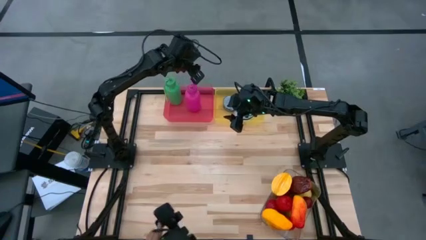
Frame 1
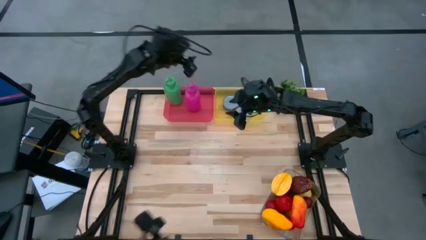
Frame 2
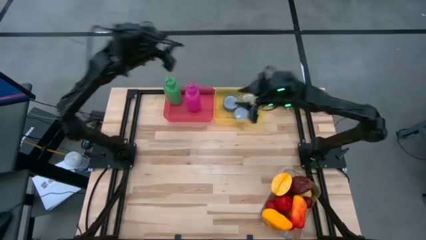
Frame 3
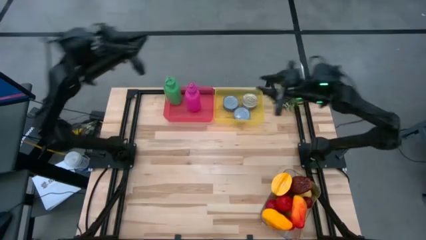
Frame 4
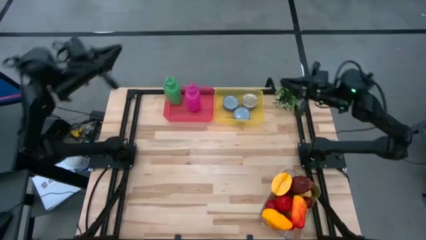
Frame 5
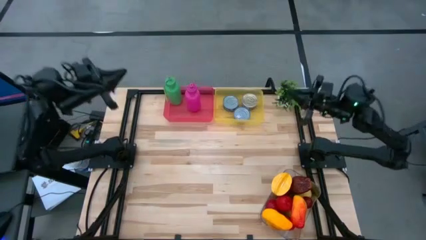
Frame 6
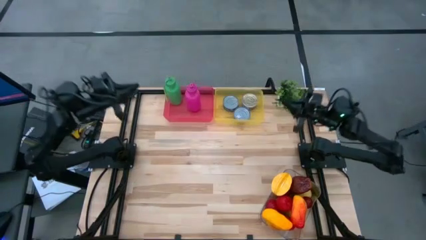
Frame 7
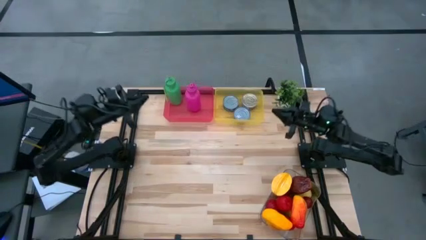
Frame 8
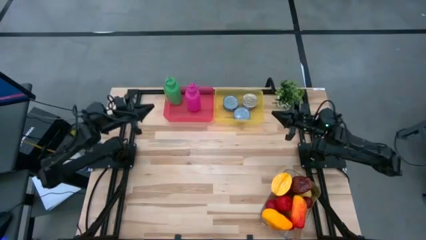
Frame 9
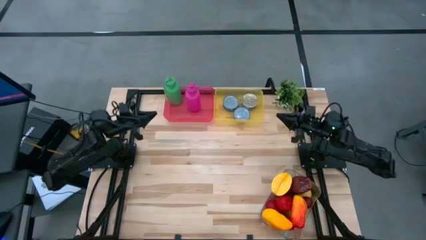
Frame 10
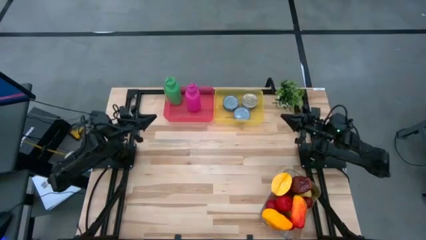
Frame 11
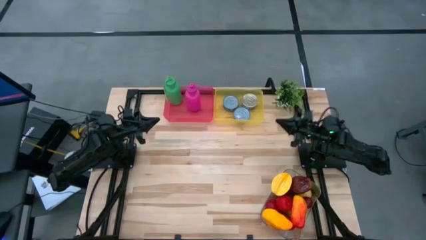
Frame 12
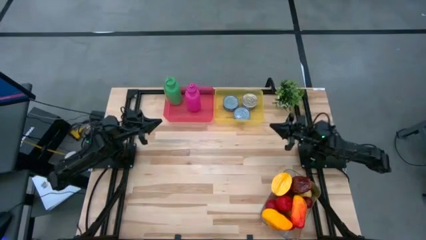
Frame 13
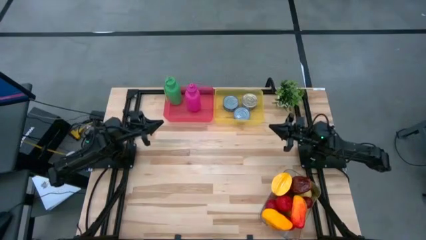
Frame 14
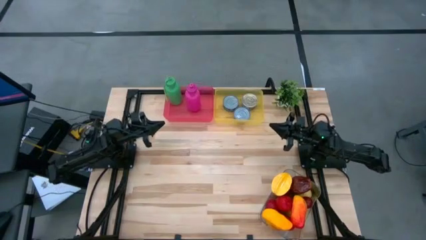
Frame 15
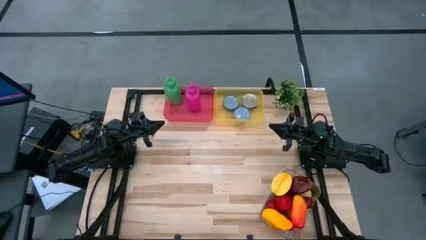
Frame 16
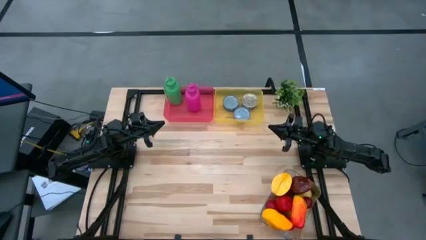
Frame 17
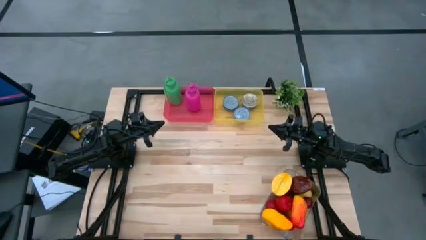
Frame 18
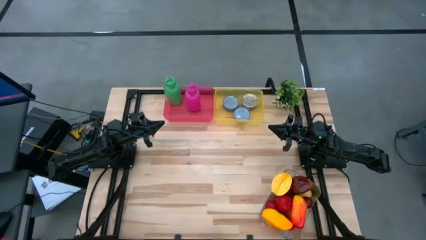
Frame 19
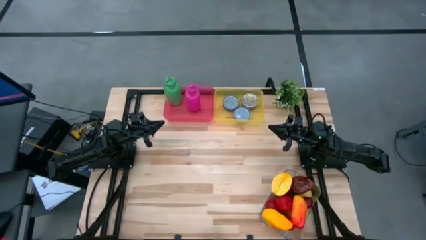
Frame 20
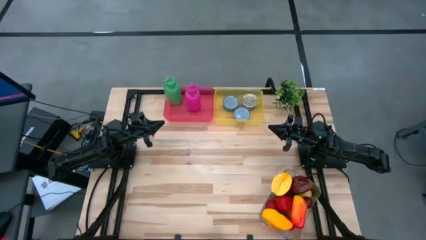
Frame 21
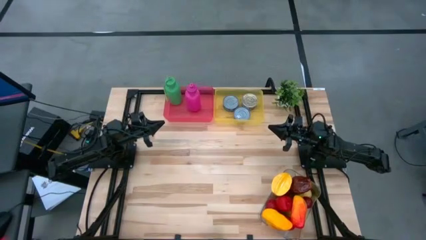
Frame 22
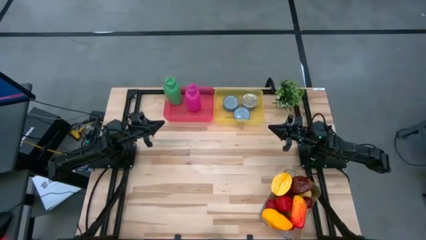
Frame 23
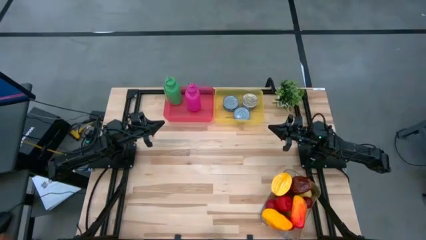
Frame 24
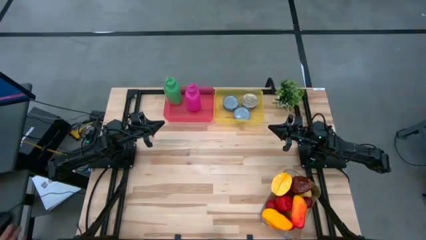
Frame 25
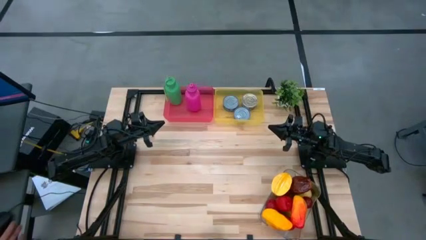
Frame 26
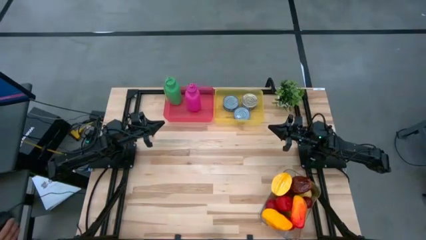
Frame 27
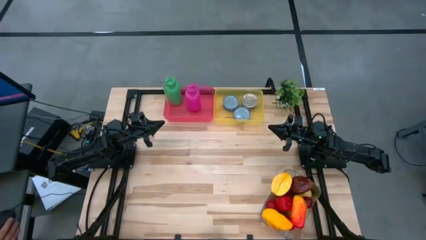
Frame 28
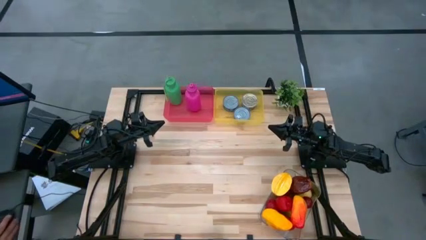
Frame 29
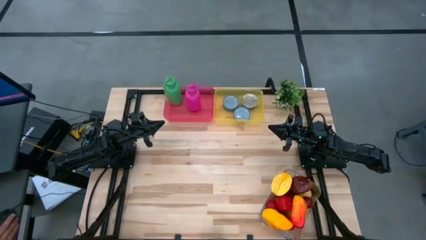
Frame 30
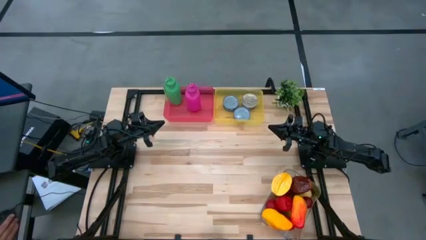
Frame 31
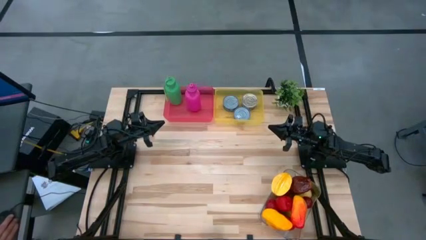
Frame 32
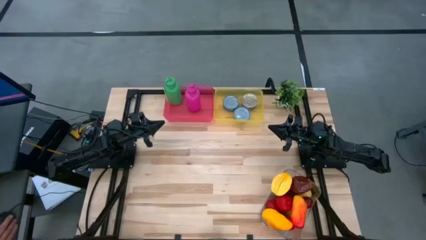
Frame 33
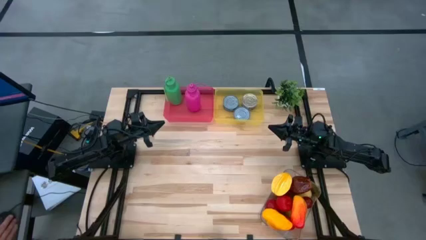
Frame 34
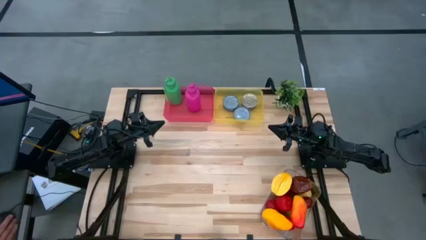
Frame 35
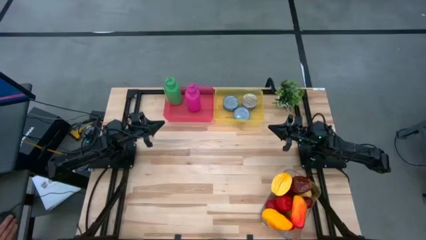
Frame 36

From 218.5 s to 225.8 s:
Task: Pick & Place Food Item
Return to Home Position

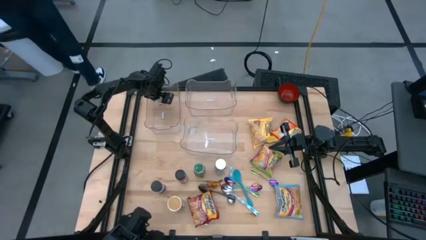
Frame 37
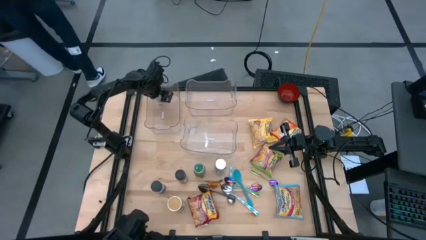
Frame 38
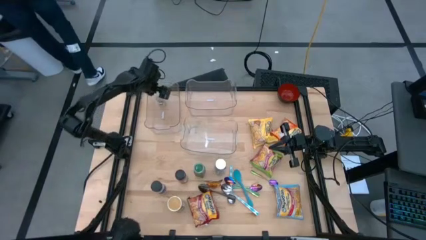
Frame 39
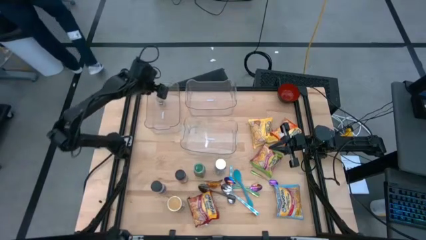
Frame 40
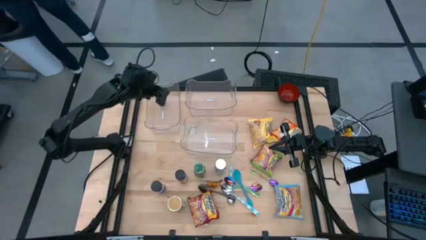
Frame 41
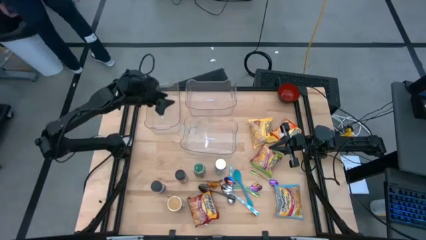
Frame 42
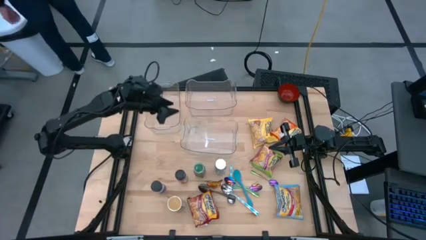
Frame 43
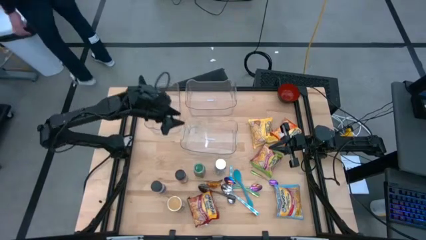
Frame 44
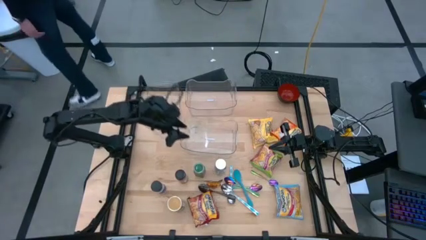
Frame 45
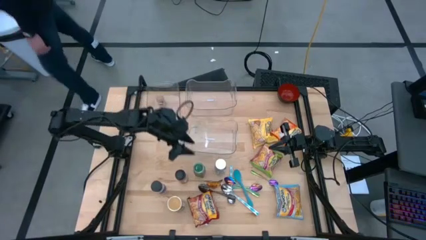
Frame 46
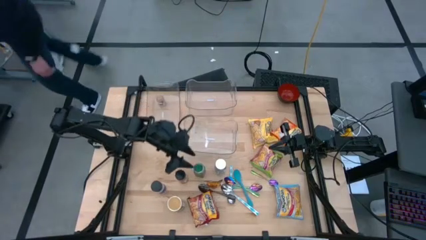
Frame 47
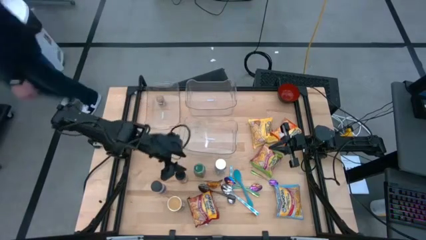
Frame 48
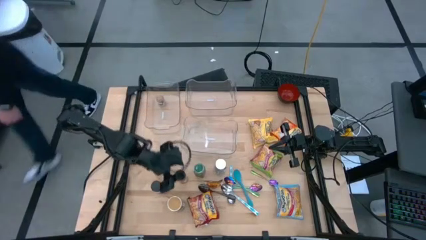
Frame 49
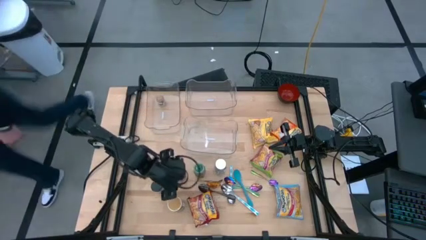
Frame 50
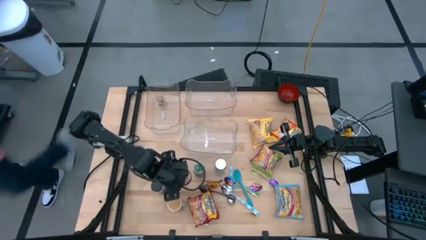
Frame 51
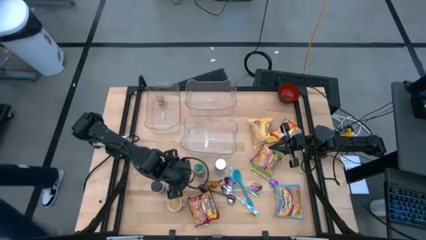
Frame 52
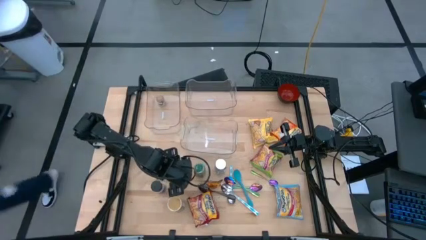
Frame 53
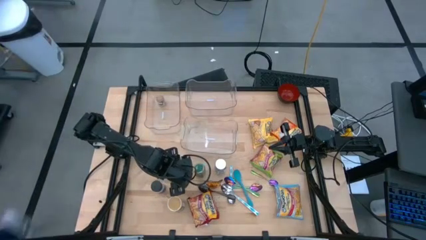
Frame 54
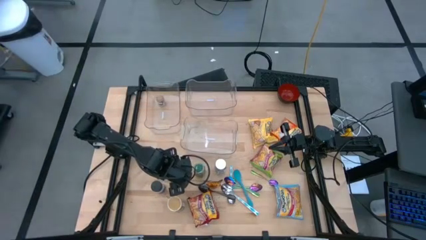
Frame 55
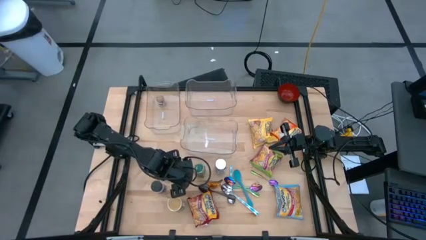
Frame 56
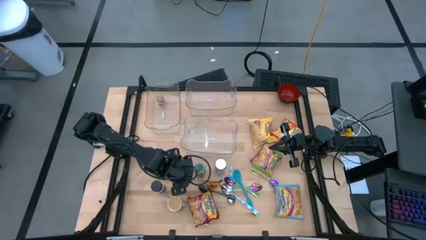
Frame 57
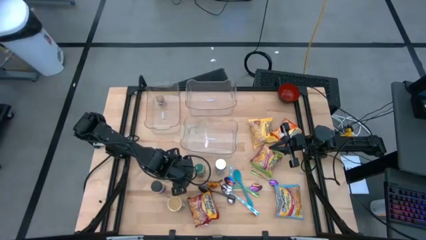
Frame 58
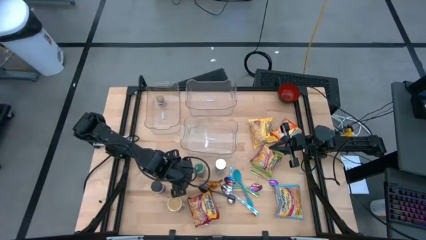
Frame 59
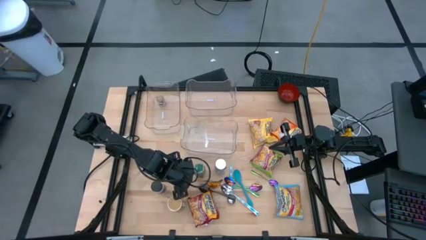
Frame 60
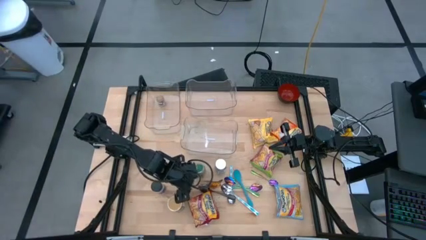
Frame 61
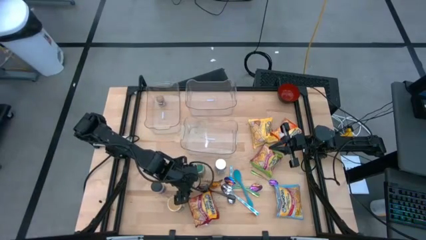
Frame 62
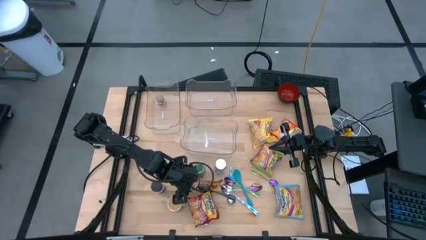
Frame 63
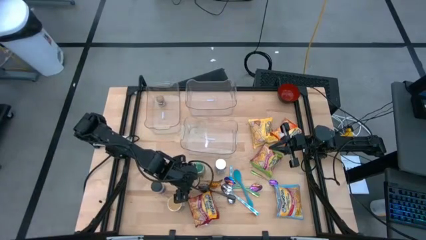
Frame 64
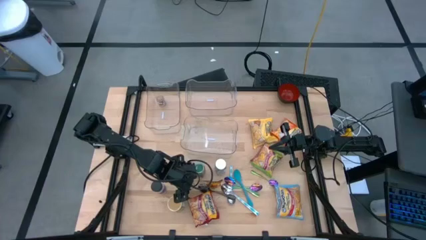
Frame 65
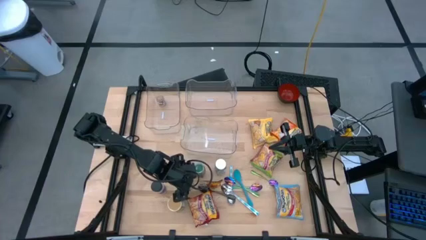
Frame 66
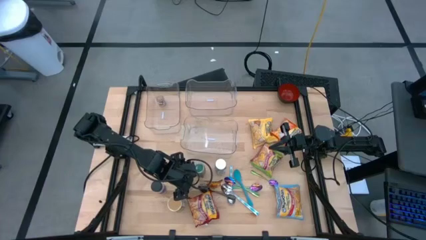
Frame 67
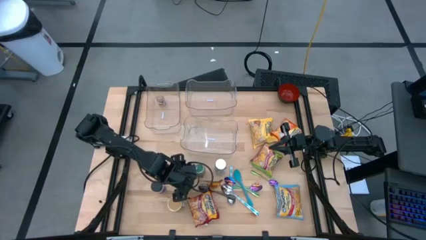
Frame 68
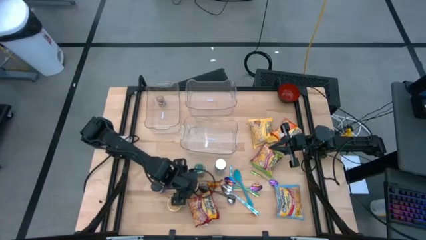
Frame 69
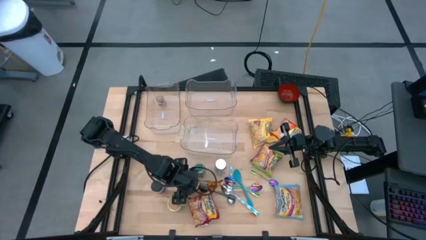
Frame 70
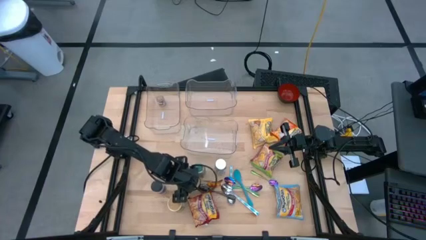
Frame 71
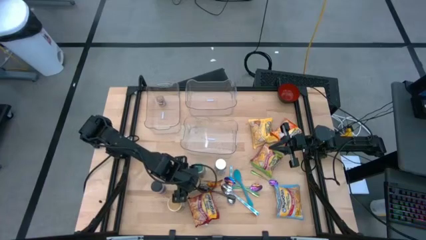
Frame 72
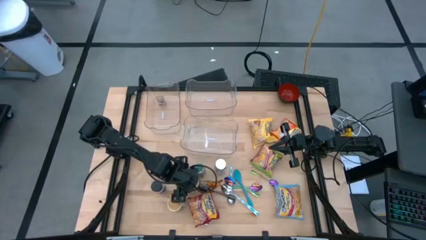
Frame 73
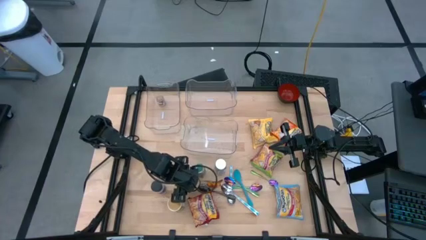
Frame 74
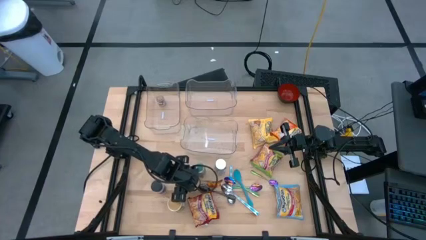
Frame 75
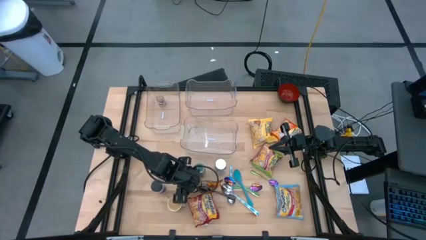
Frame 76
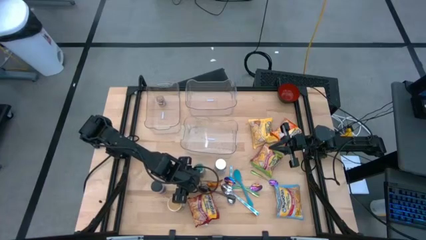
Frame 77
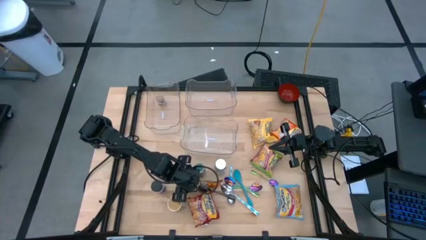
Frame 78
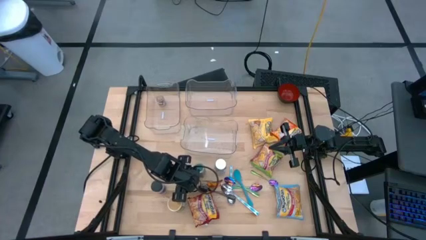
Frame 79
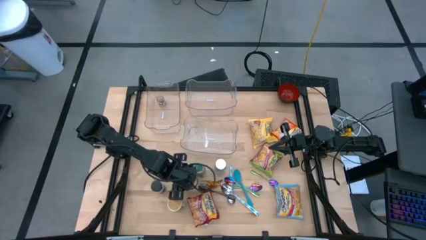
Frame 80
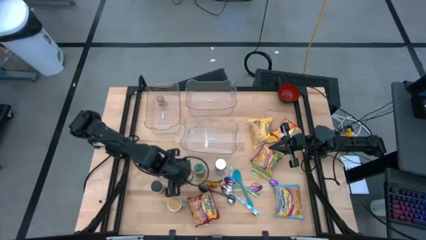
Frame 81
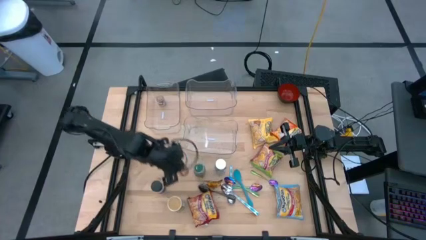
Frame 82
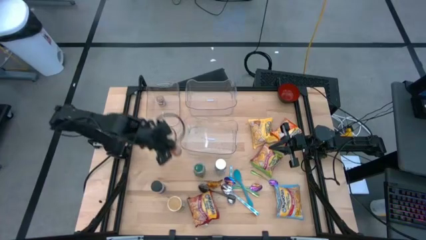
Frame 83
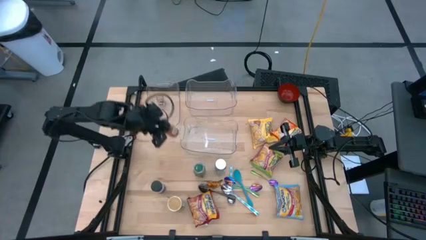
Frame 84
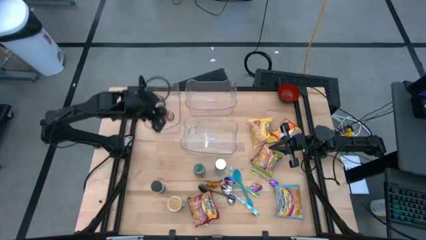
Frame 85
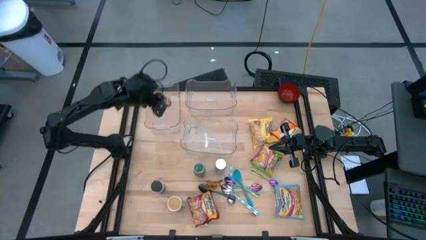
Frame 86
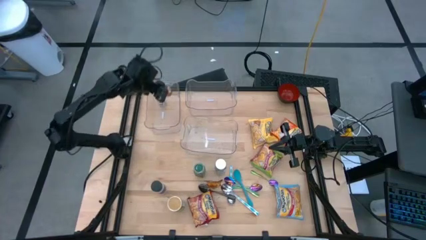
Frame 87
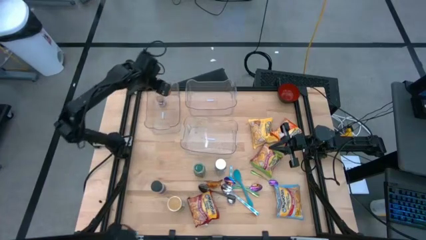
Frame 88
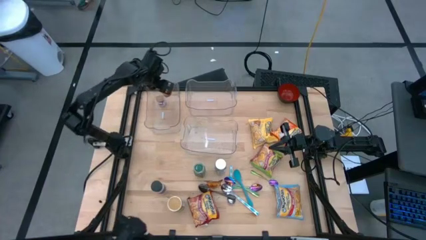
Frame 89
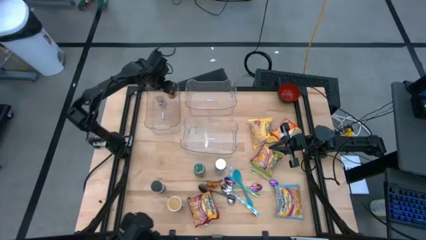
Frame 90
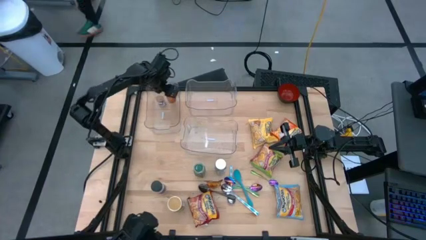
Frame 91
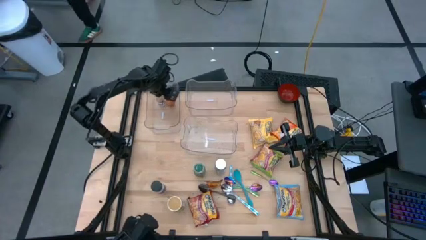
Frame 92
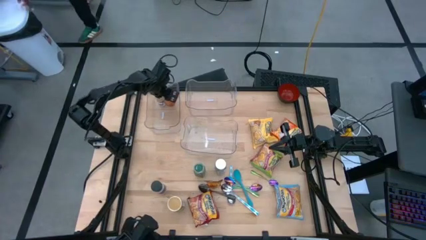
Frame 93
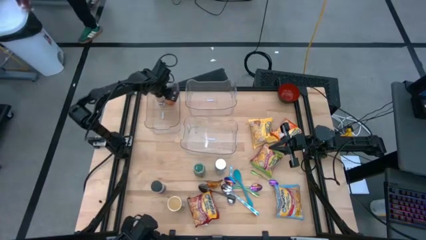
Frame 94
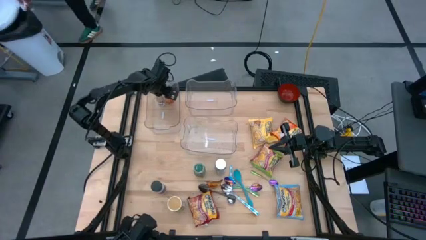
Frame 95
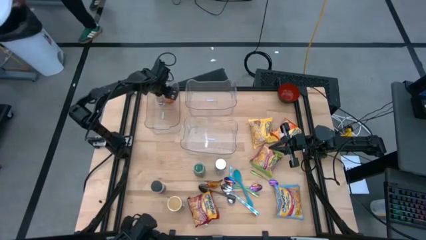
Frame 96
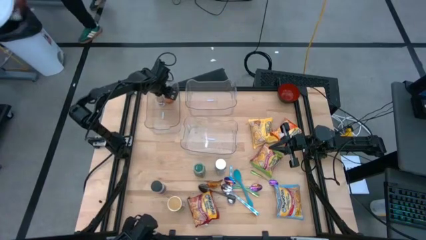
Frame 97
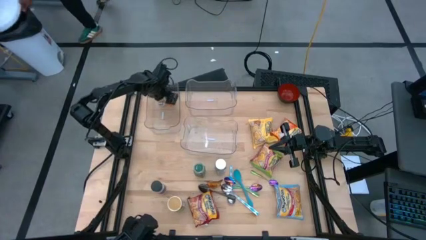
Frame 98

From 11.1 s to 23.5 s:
Task: Pick & Place Food Item
Put the orange seasoning bottle into the top left transparent bin
